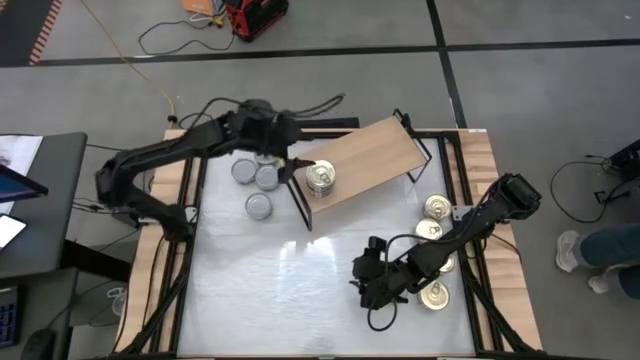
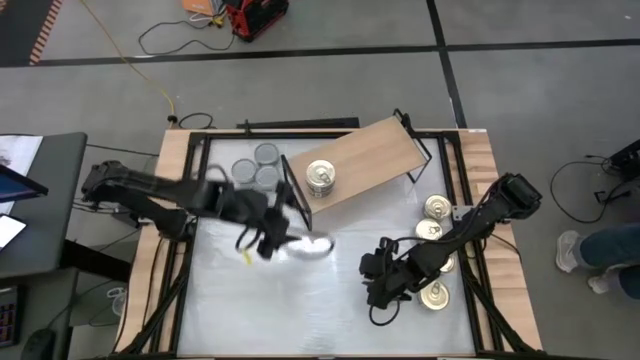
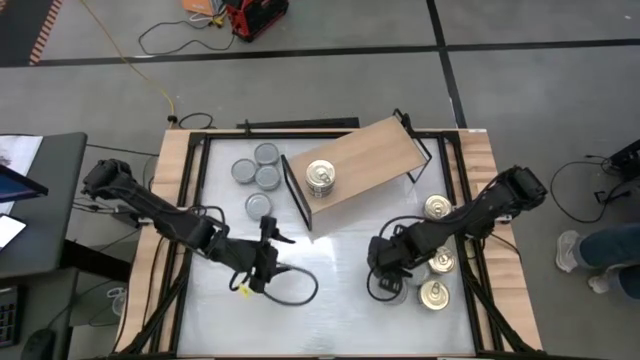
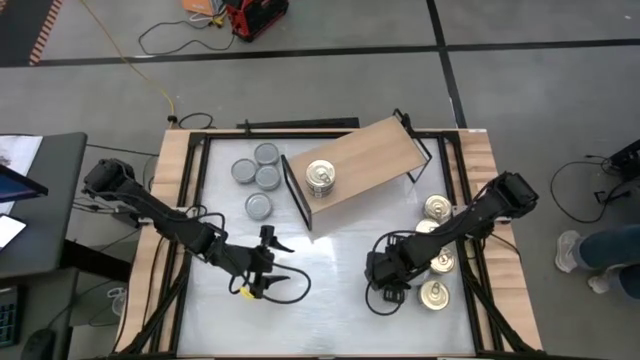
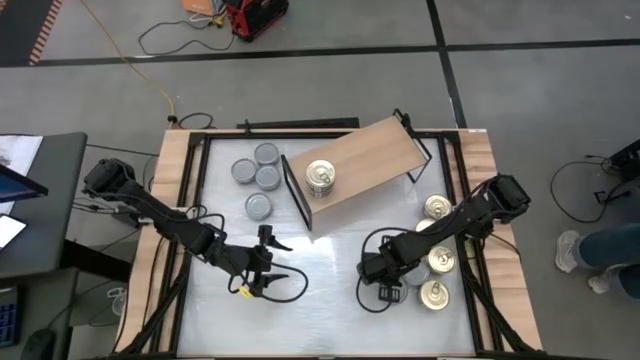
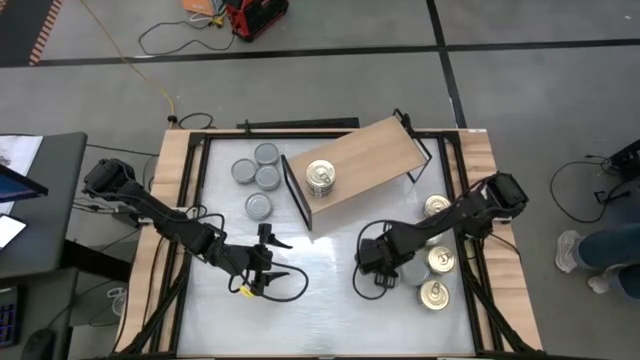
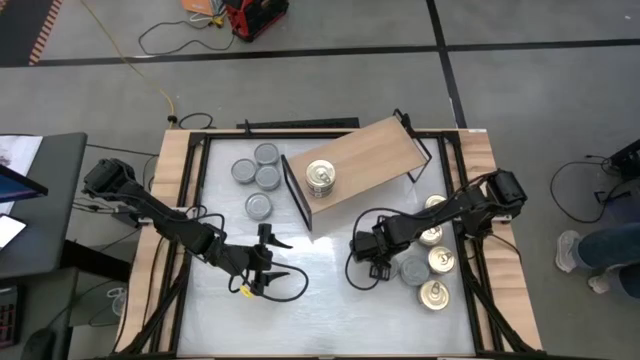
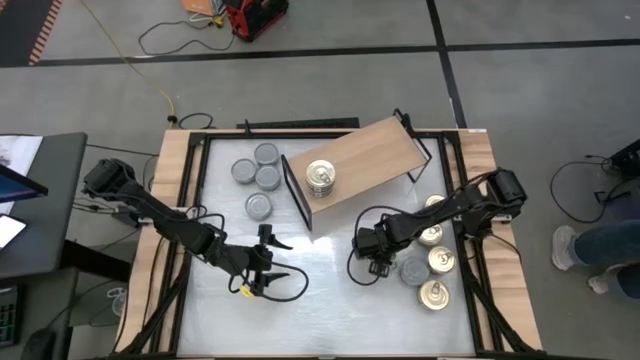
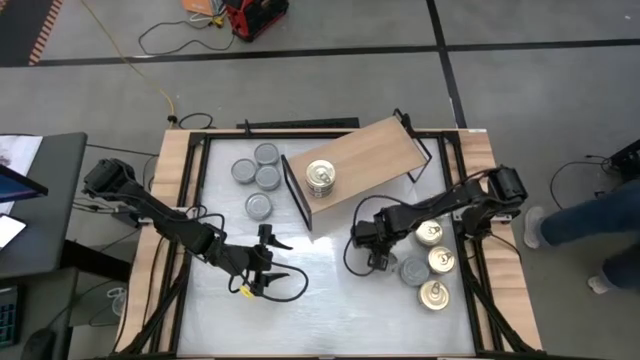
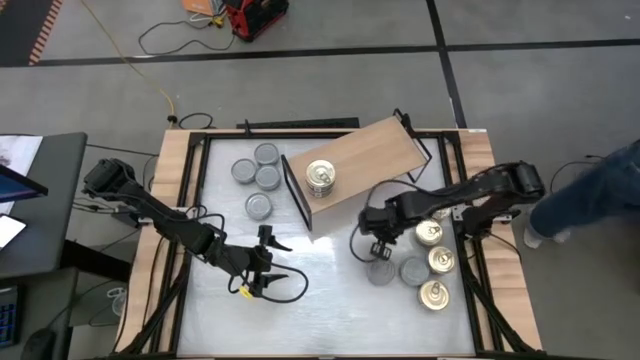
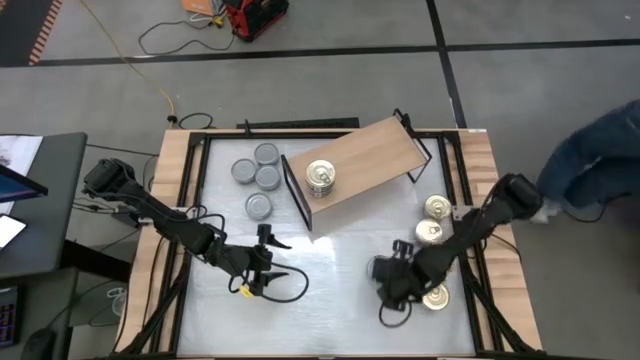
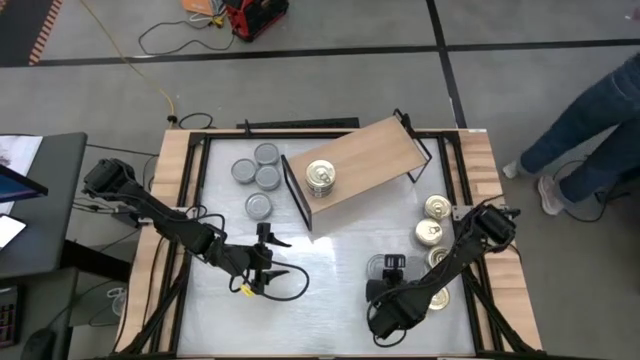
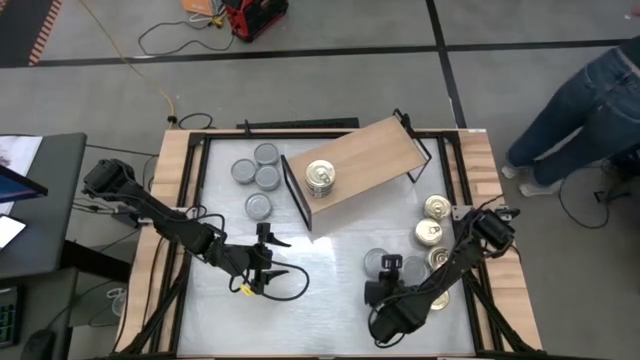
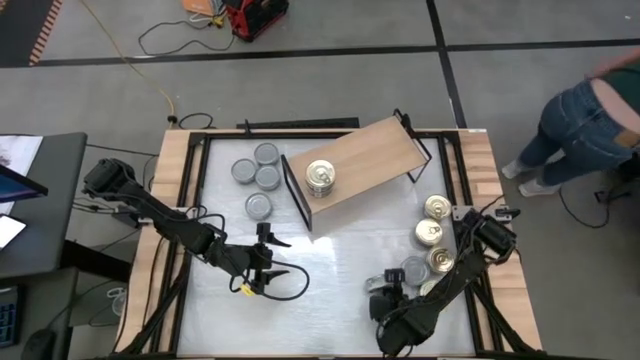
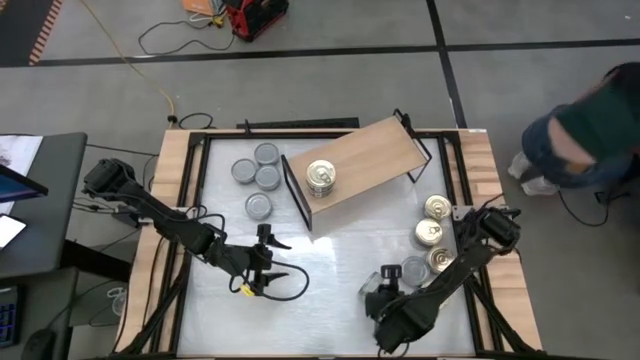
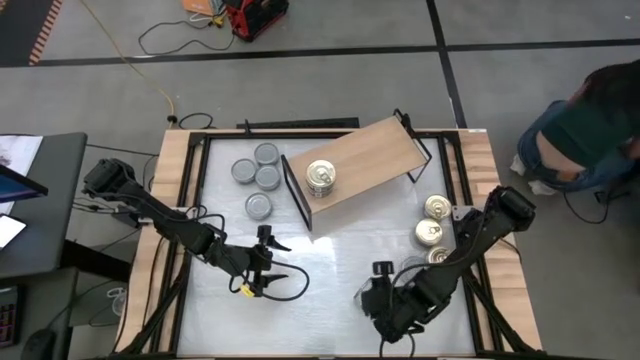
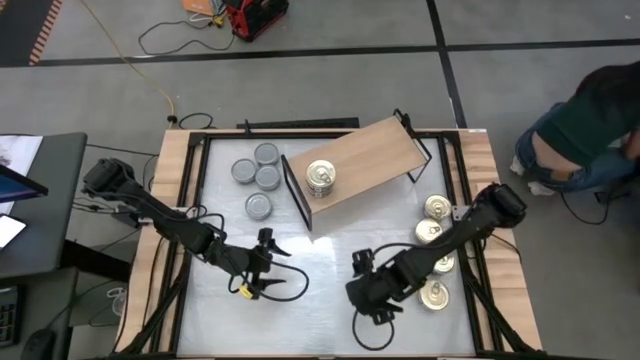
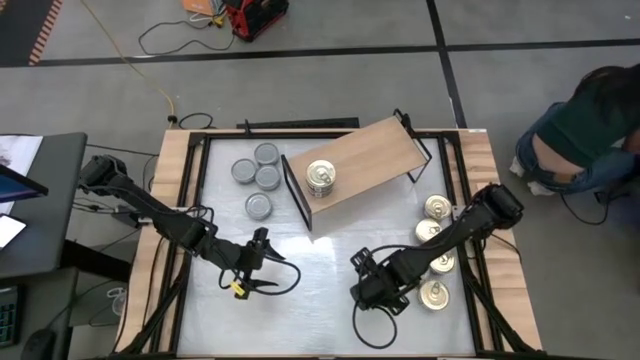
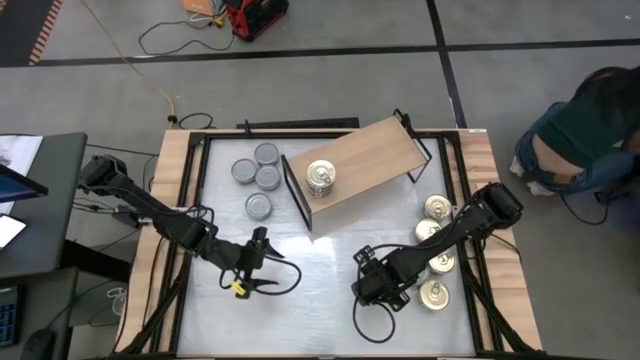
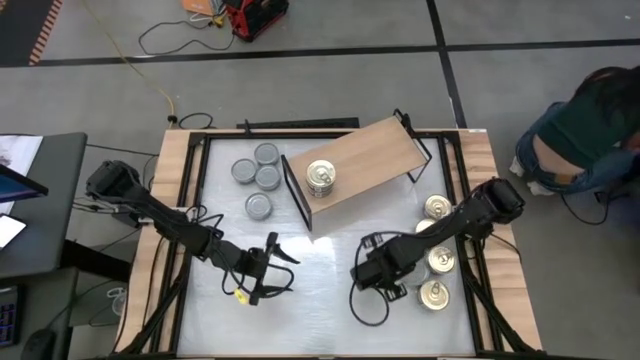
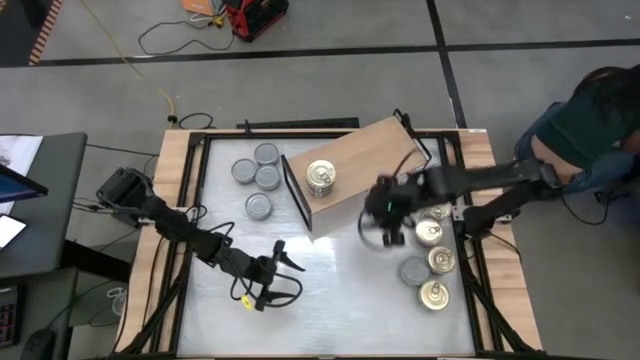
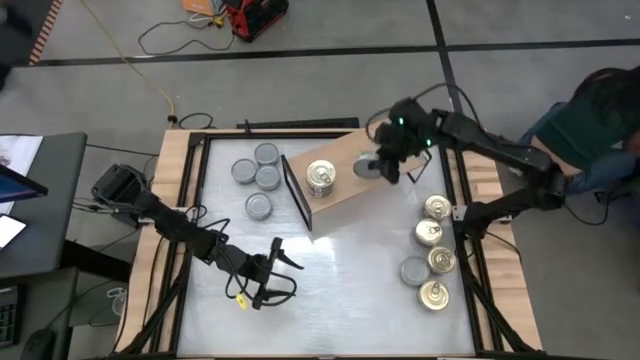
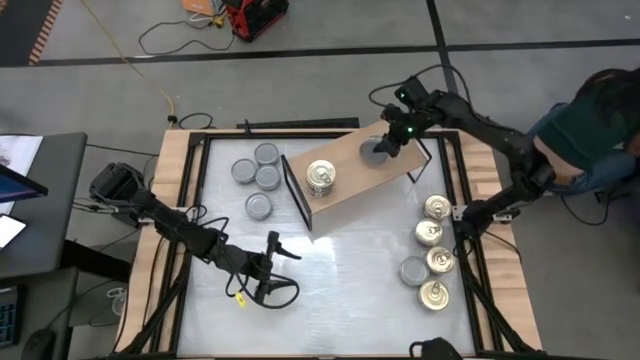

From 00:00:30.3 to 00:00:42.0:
Task: Stack canned seafood by type on shelf
Put the green tuna can on the shelf

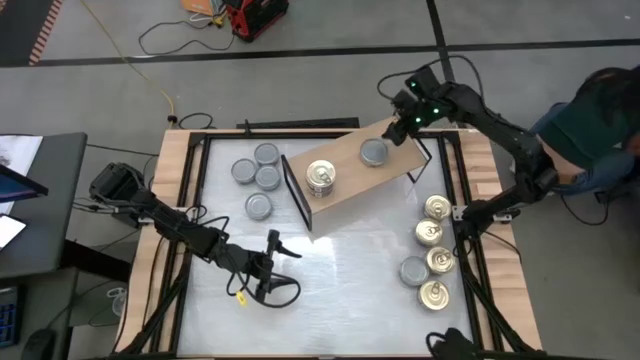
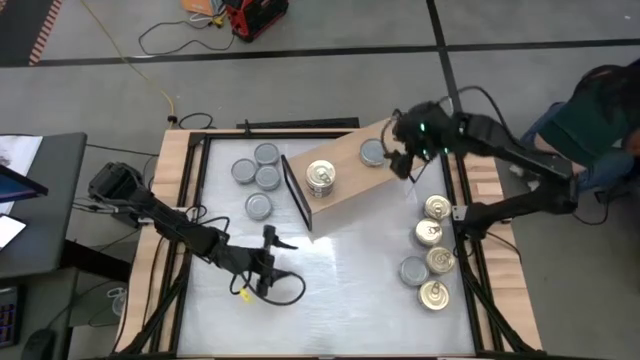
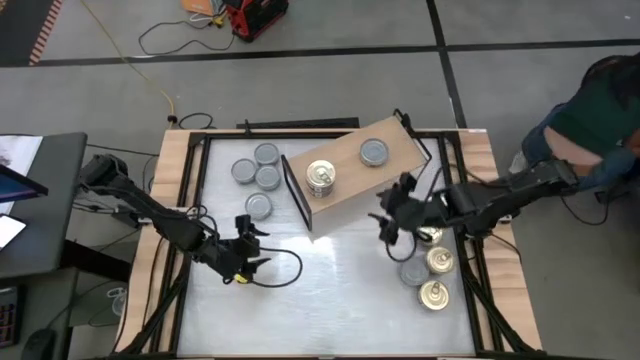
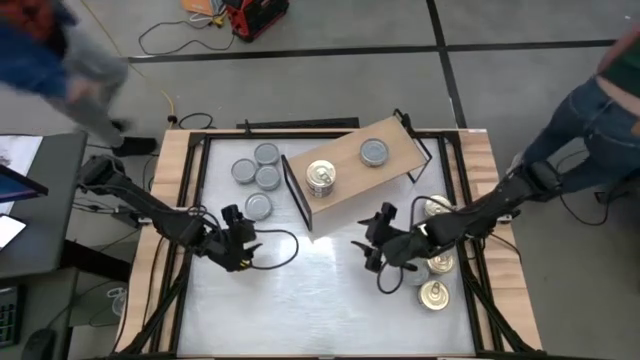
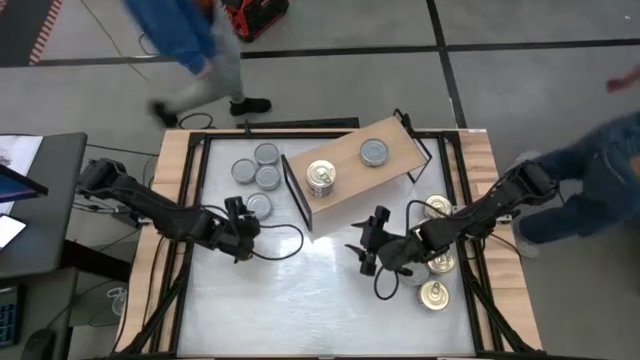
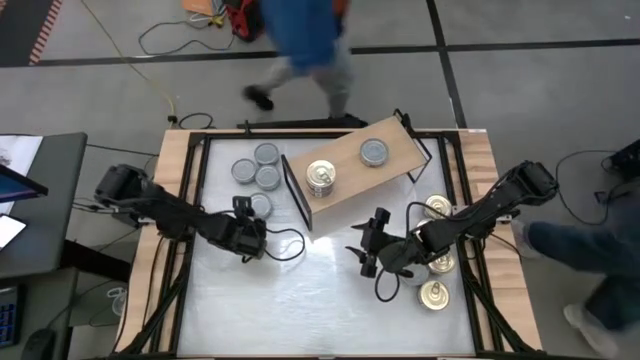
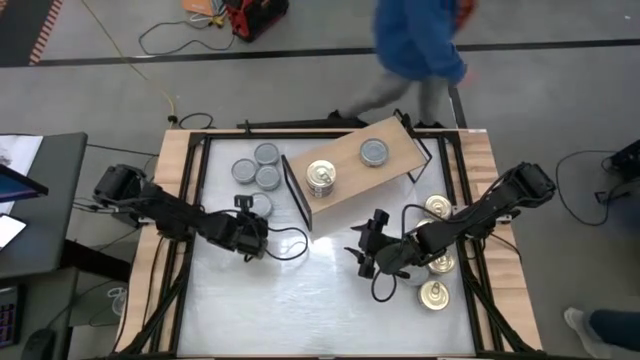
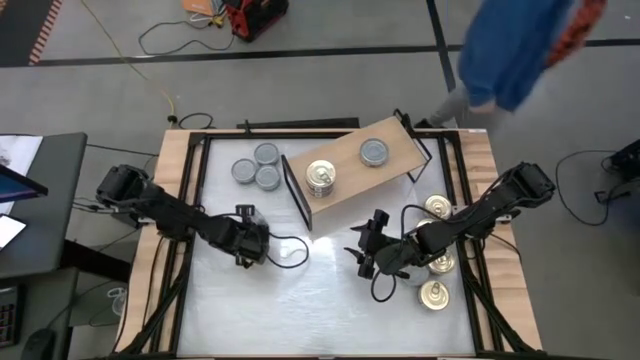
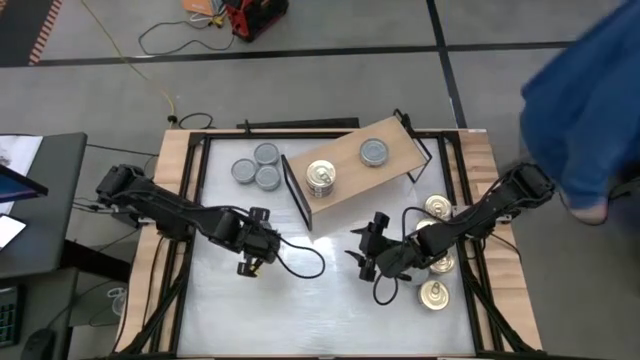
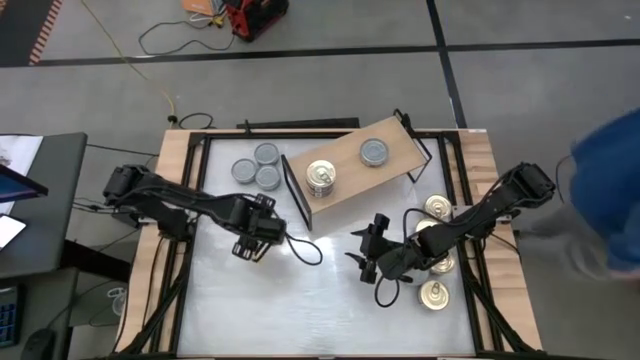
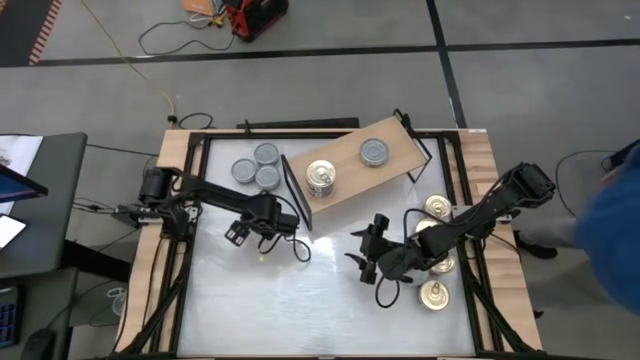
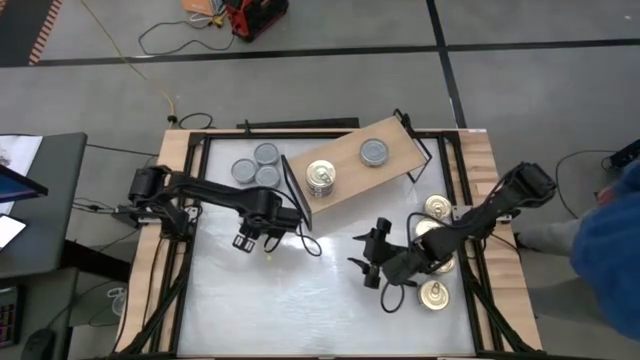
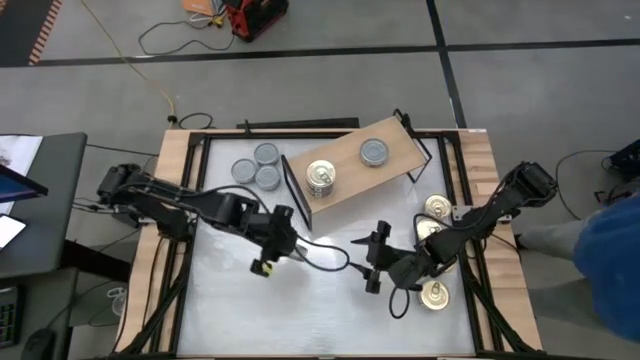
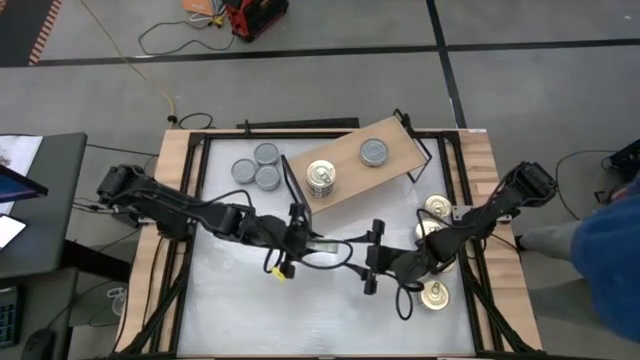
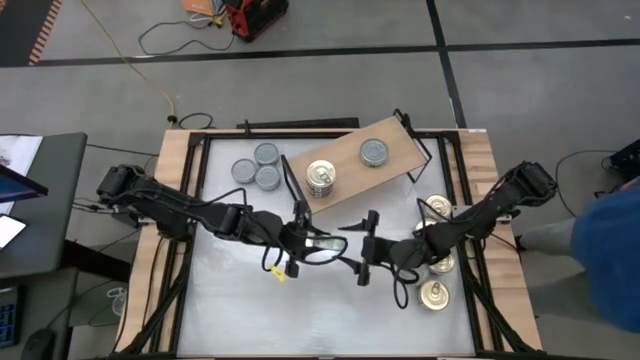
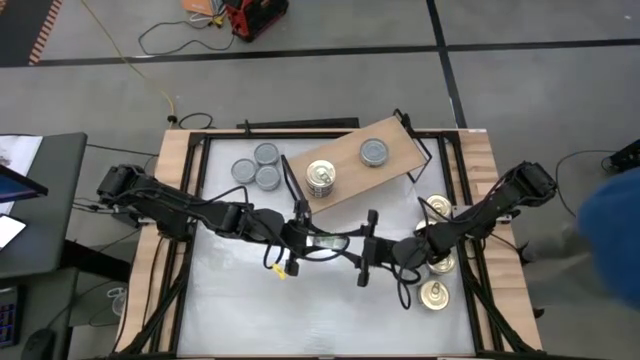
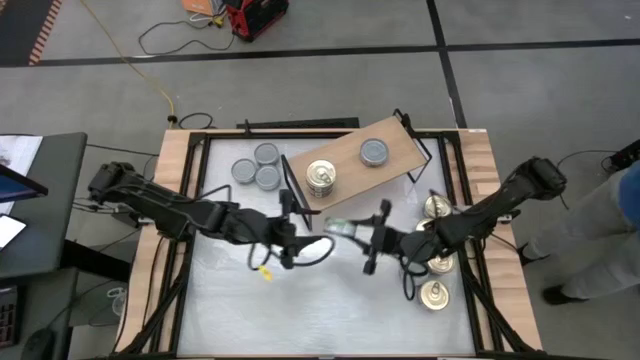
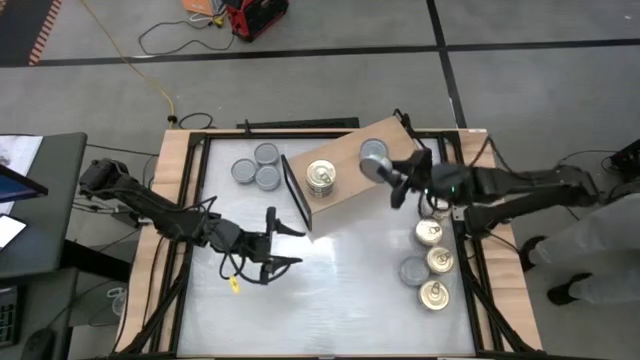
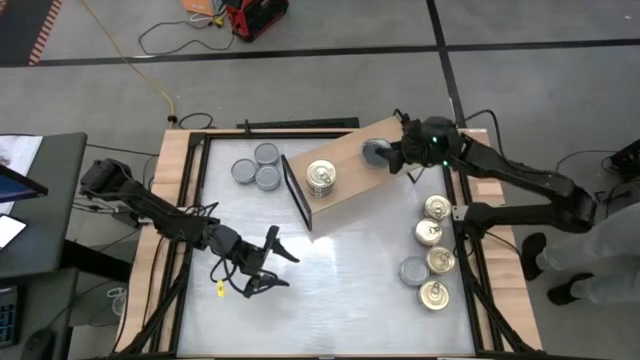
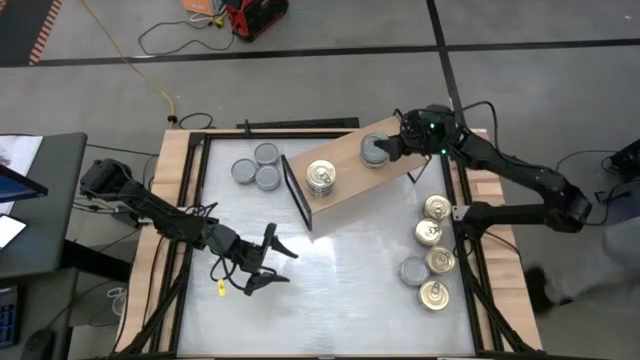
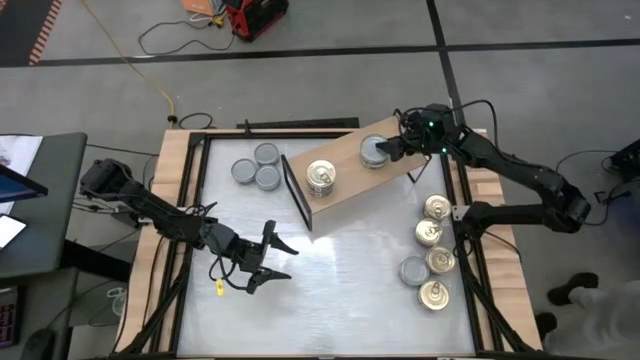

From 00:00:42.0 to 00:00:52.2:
Stack the green tuna can on top of the green tuna can
